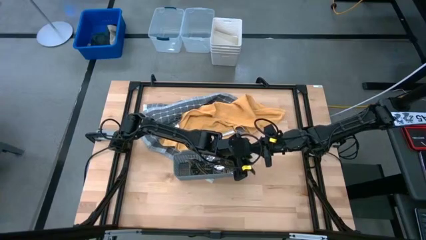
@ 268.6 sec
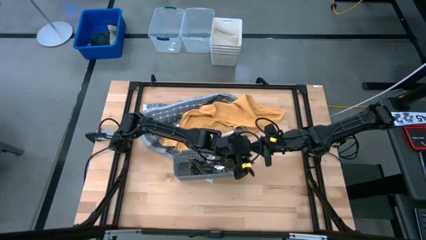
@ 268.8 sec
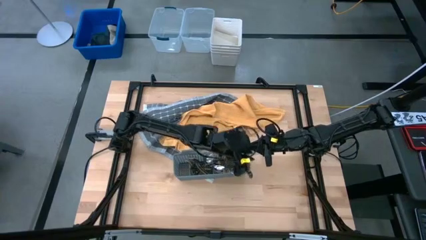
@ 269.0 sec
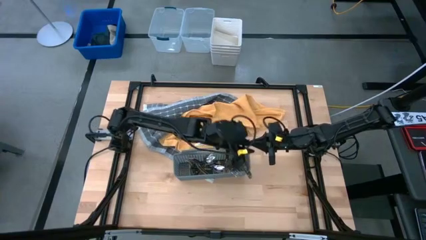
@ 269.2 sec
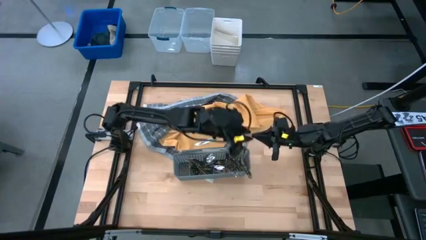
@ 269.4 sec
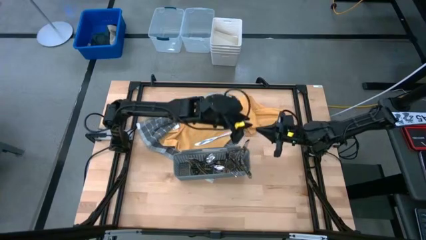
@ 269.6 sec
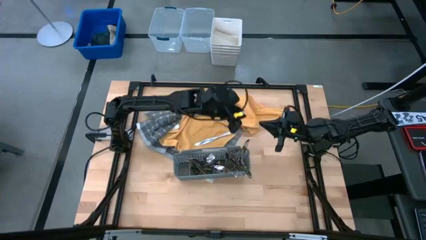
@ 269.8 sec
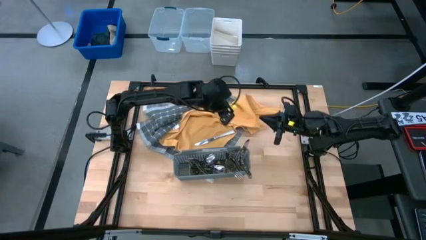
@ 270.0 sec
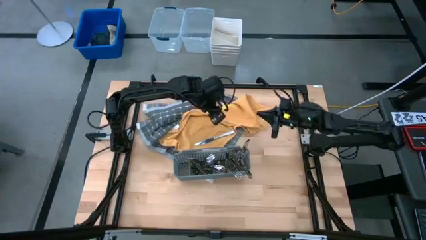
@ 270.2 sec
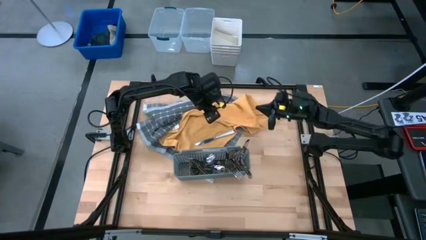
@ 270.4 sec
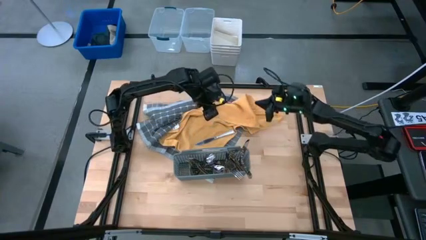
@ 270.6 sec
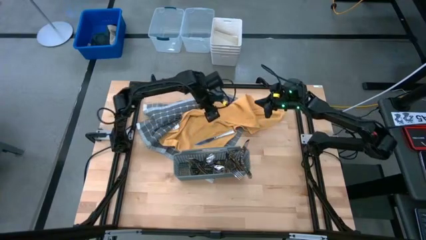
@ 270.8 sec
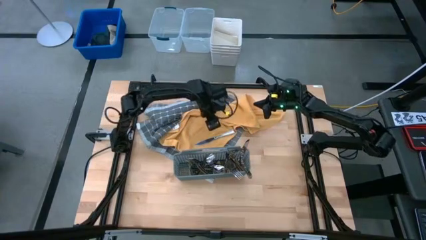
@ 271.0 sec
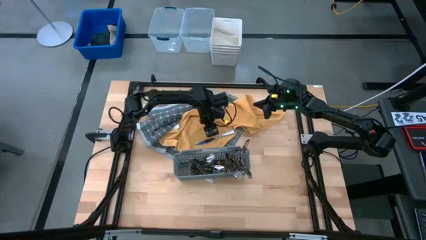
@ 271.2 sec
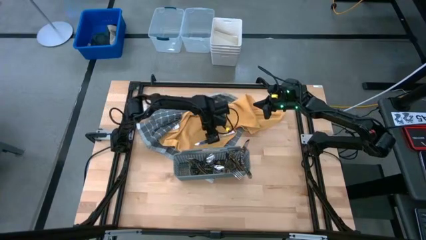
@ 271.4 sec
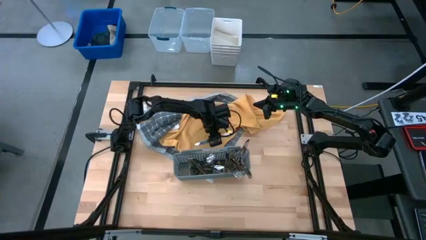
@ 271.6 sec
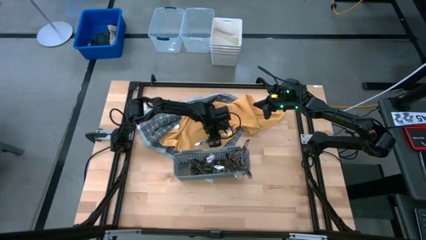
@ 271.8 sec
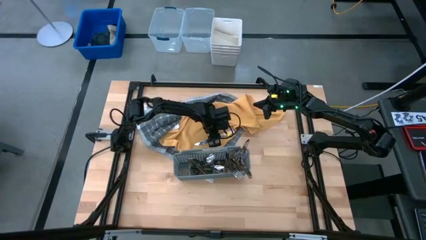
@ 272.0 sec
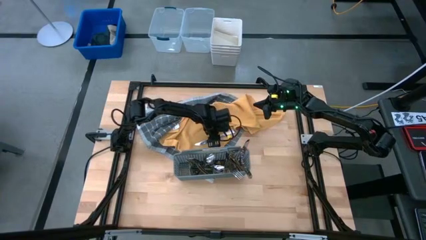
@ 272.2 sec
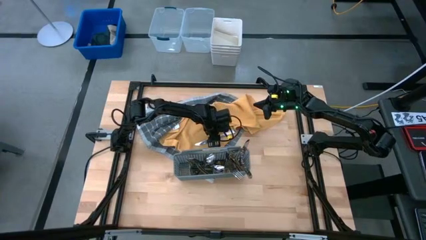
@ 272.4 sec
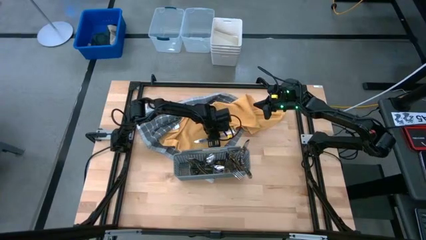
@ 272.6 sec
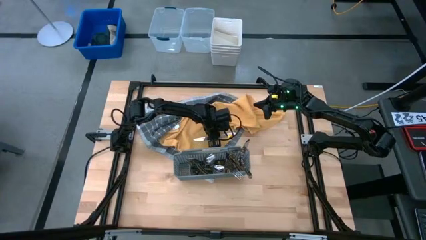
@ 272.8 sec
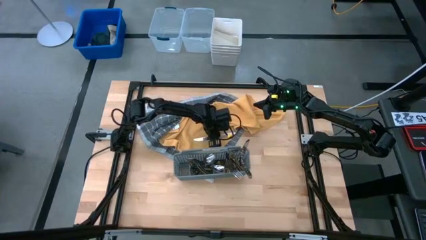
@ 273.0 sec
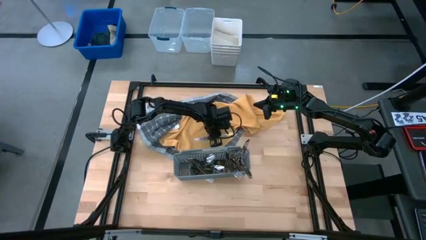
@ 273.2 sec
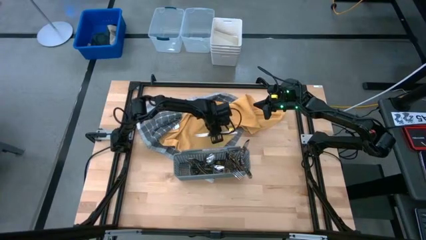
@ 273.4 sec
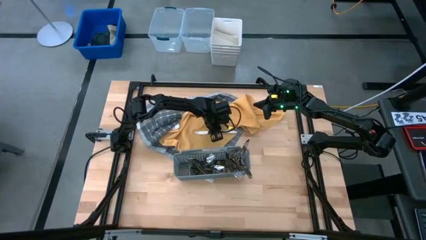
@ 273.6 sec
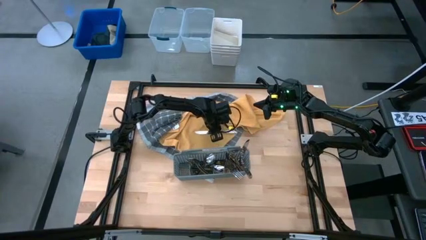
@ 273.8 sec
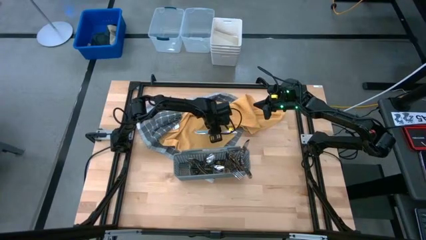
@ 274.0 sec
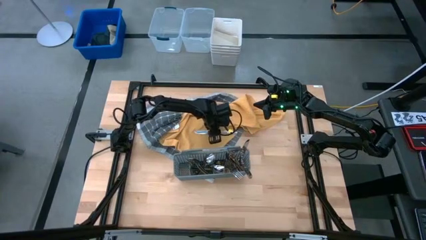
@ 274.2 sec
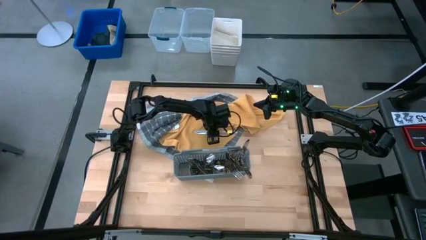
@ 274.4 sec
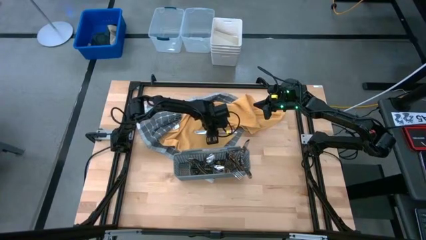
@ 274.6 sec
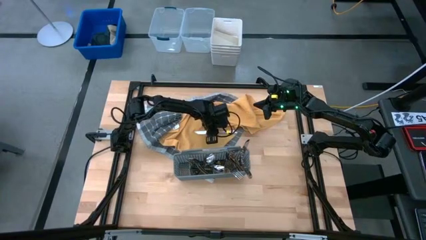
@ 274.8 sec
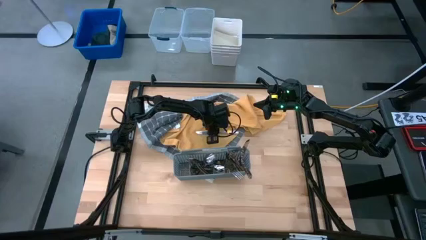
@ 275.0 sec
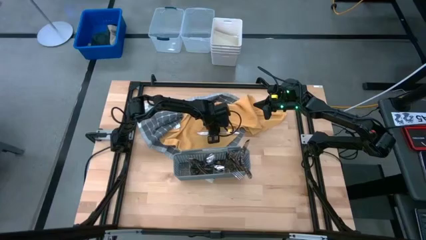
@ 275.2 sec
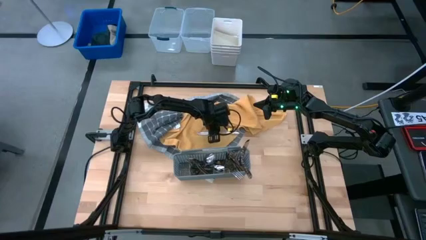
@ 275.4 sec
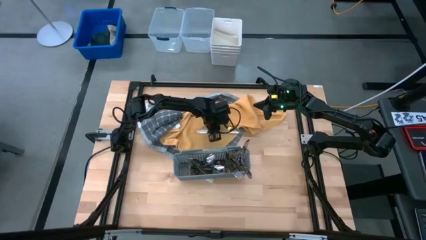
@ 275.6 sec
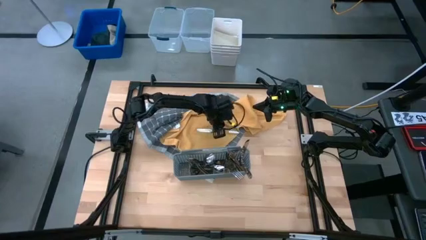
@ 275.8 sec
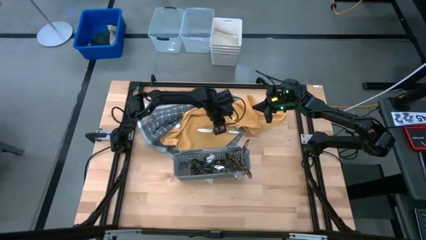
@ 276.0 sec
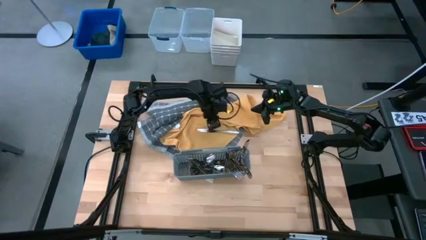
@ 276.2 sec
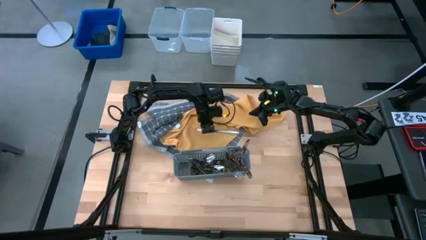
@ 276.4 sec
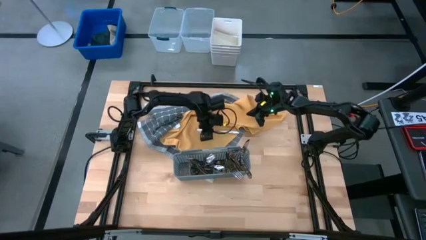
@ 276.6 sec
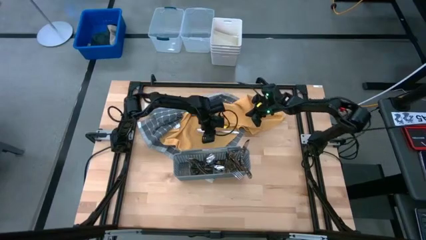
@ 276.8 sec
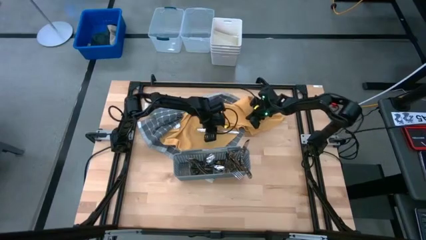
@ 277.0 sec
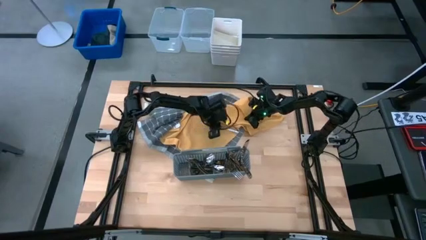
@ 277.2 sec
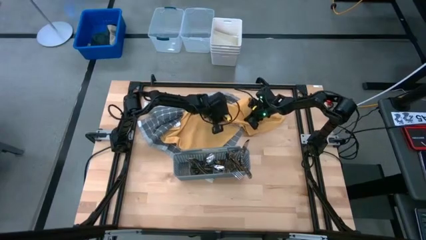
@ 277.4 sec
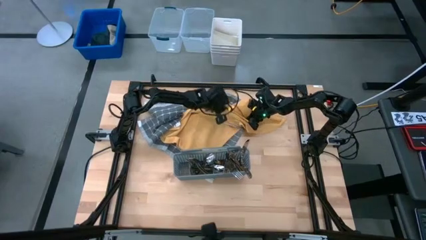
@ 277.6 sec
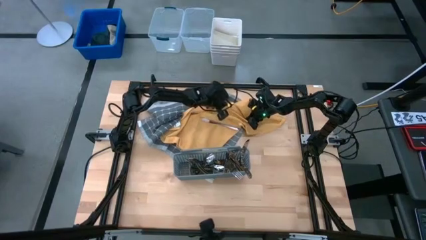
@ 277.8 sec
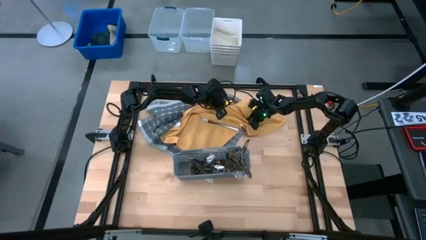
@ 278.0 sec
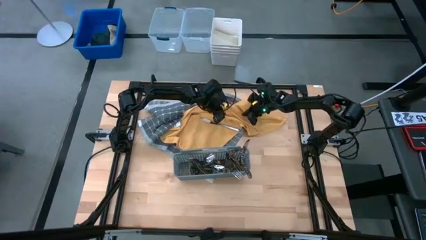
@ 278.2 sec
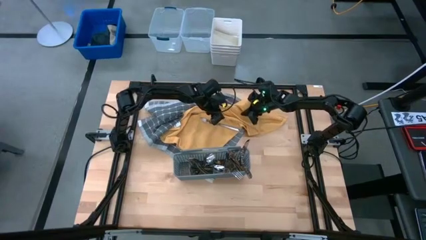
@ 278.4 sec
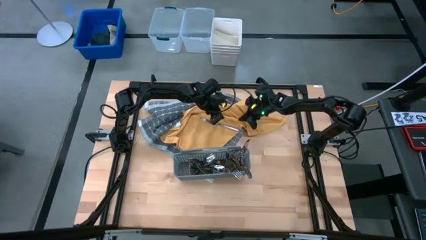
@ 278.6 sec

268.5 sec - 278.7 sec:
Task: Sort silverware
Put the silver knife into the gray silverware basket

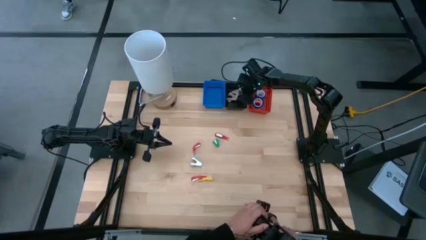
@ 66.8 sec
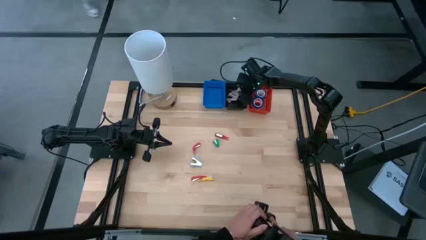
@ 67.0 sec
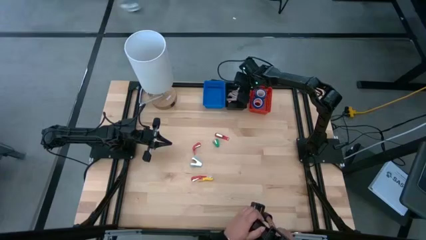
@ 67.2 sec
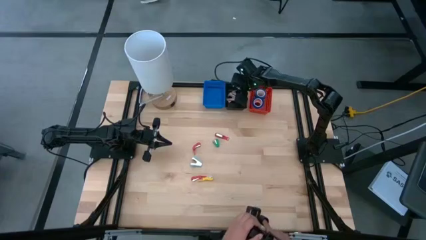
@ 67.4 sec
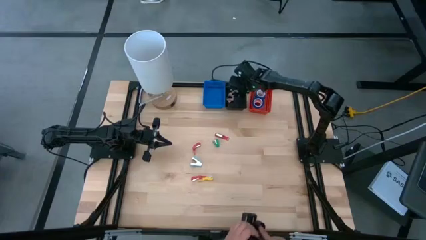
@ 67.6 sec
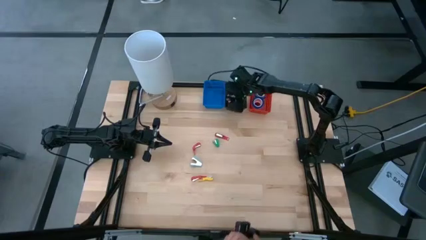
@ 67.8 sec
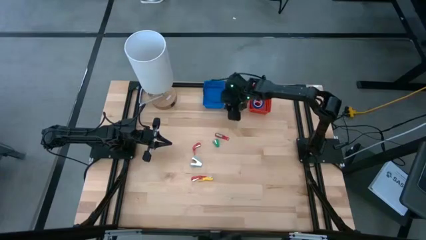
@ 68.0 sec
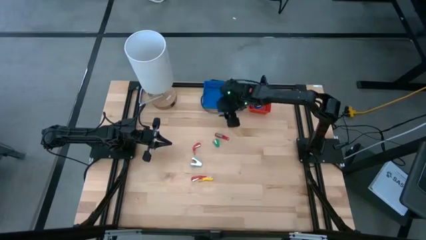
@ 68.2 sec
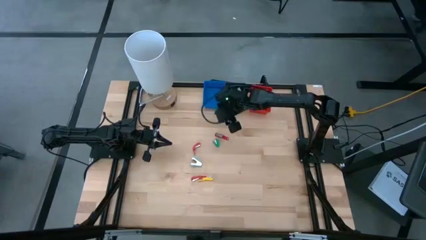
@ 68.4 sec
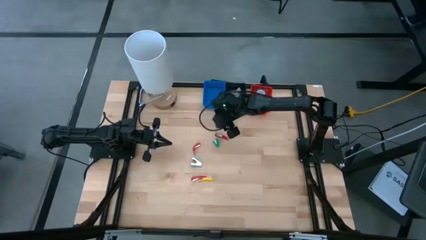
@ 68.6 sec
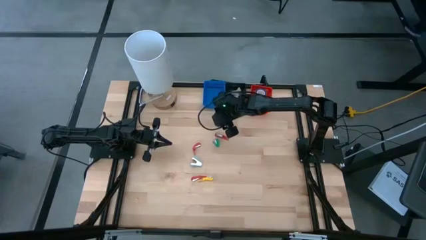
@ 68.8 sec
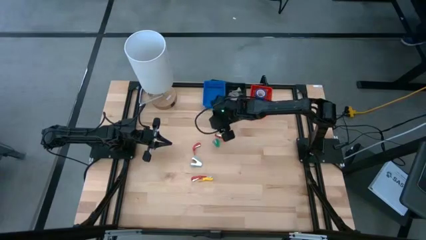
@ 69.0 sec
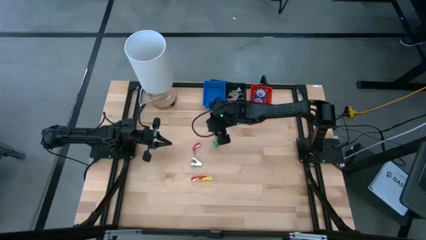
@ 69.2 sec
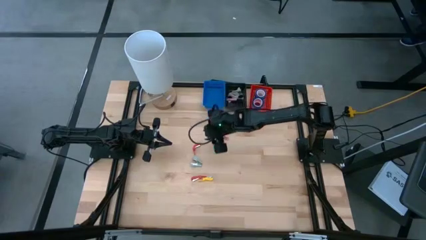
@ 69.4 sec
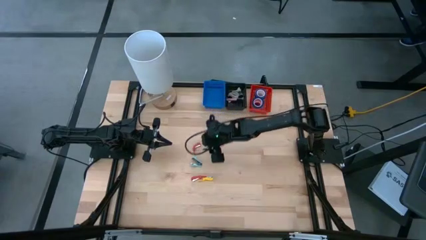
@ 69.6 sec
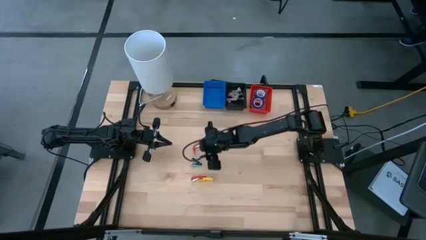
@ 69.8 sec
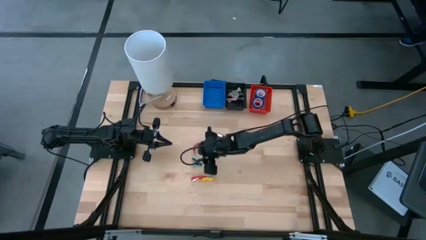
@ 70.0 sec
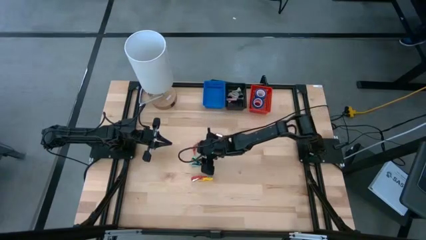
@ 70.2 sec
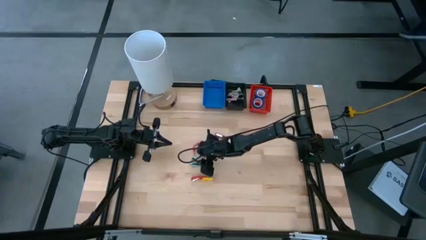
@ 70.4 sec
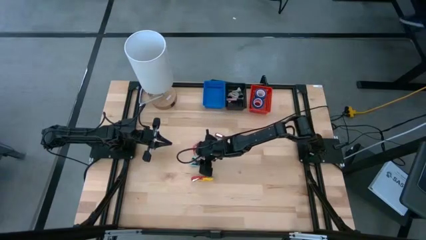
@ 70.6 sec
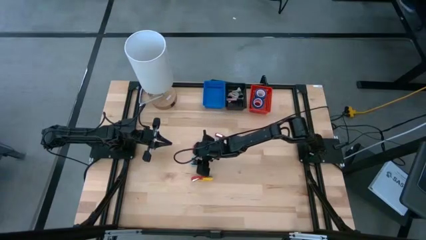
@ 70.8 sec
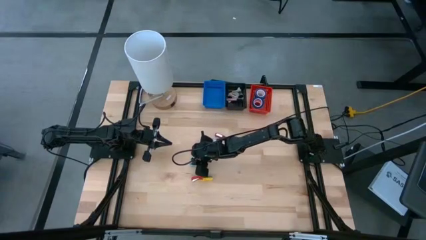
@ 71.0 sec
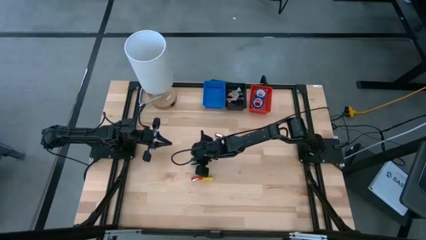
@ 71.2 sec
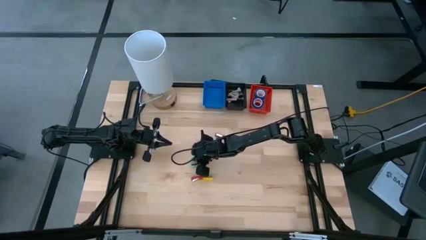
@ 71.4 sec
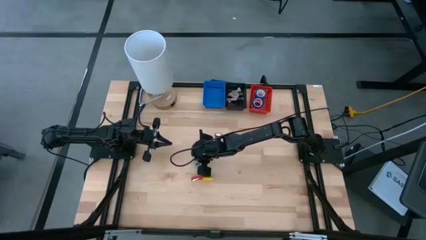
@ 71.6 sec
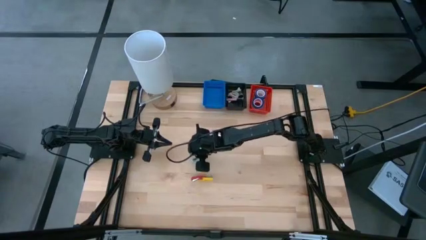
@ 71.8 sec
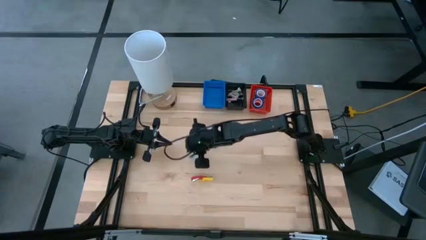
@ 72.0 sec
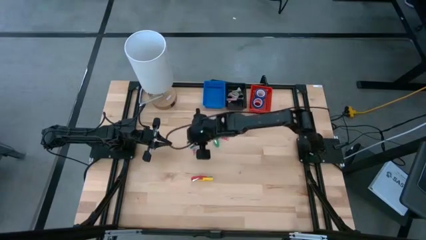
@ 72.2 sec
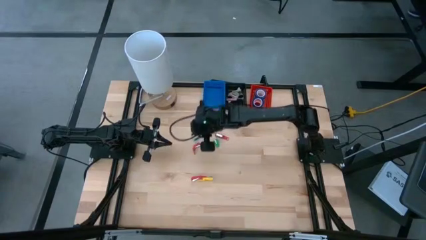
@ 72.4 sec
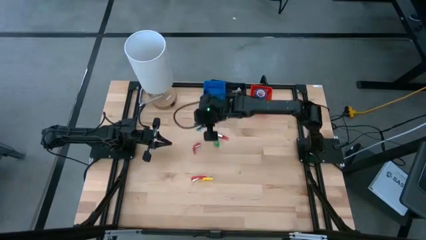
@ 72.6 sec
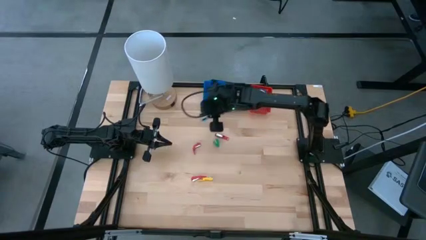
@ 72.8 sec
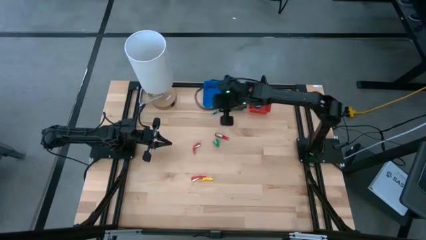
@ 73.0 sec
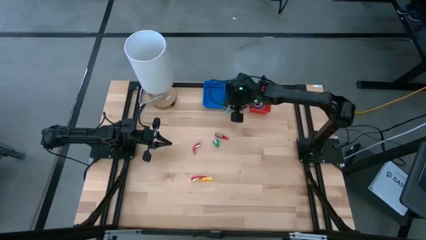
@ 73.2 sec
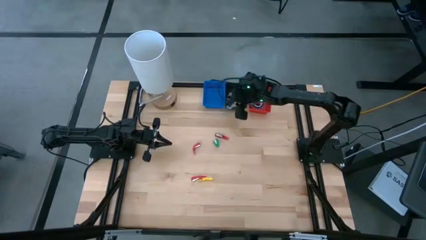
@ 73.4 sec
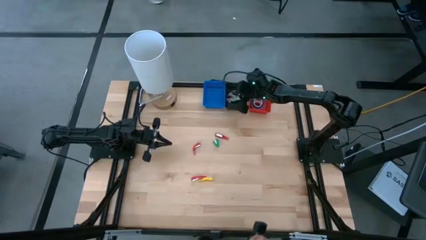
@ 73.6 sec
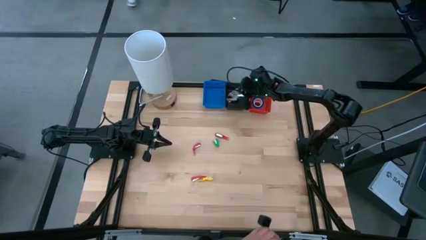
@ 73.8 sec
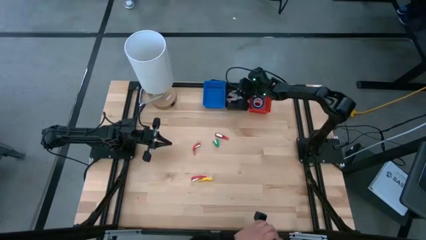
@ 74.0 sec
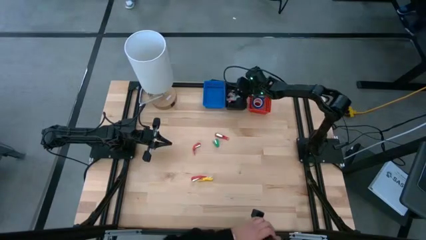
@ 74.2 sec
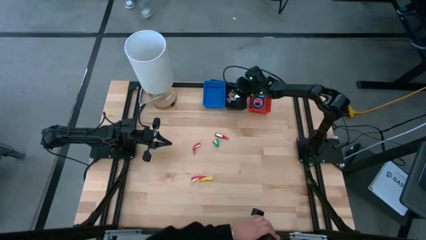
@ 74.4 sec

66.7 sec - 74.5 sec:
Task: Pick and place Stapler, Stapler remover, tape
Put the blue staple remover into the black bin
